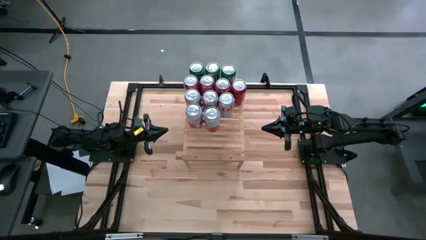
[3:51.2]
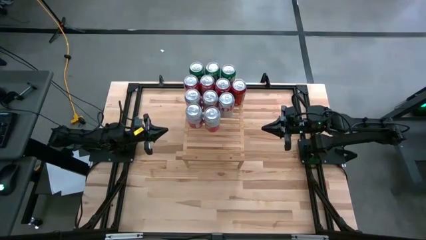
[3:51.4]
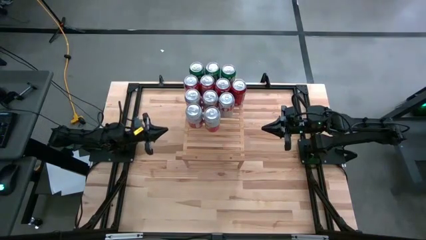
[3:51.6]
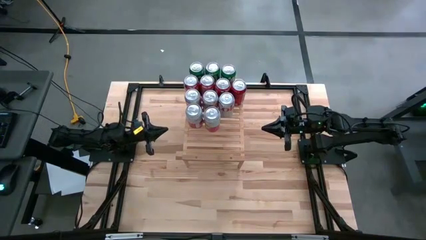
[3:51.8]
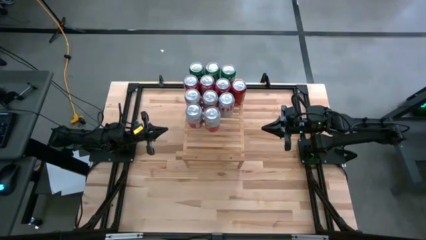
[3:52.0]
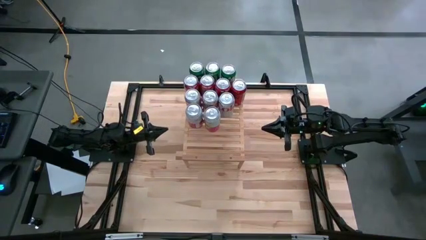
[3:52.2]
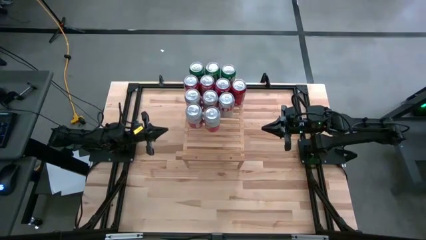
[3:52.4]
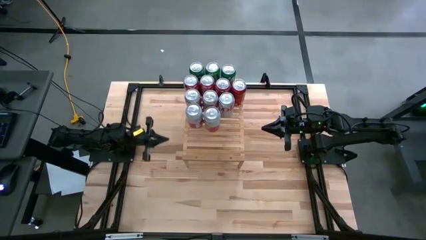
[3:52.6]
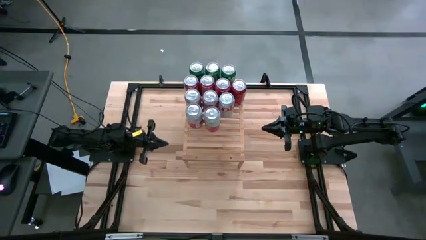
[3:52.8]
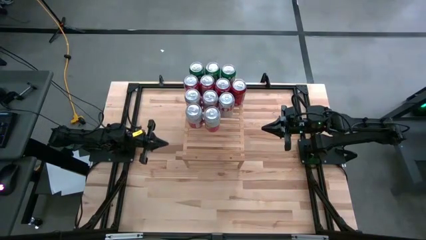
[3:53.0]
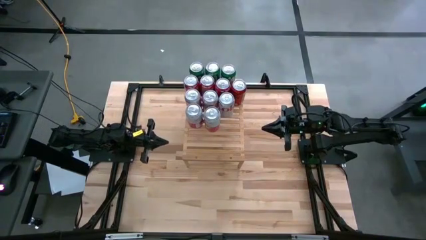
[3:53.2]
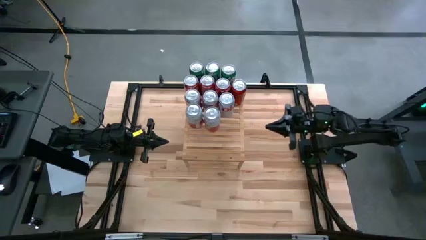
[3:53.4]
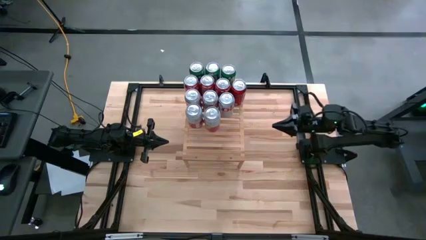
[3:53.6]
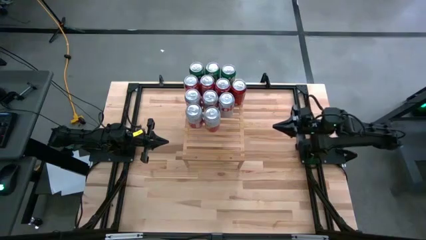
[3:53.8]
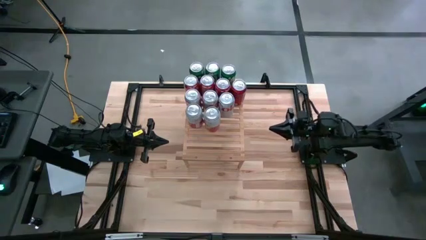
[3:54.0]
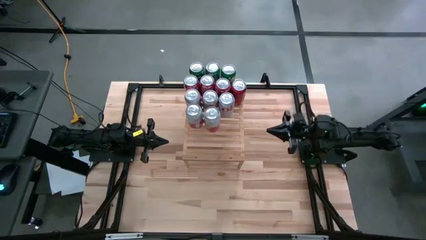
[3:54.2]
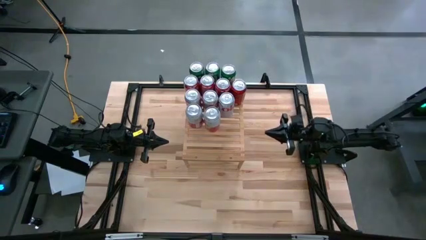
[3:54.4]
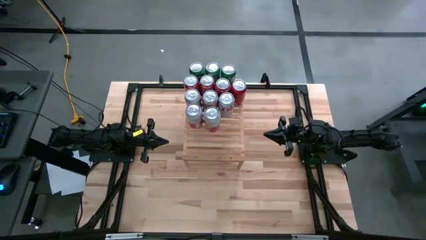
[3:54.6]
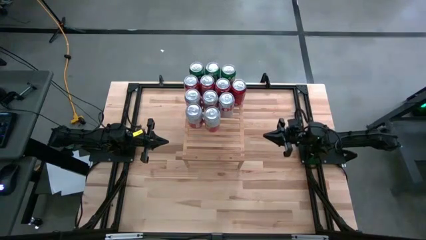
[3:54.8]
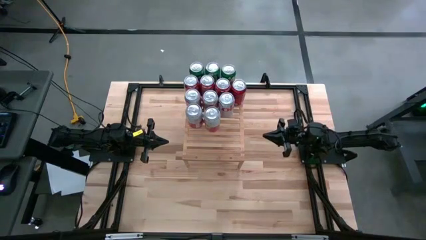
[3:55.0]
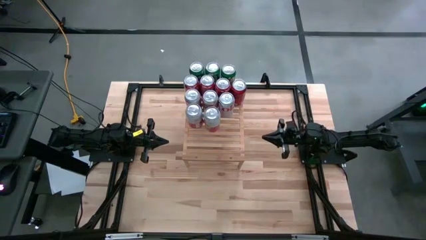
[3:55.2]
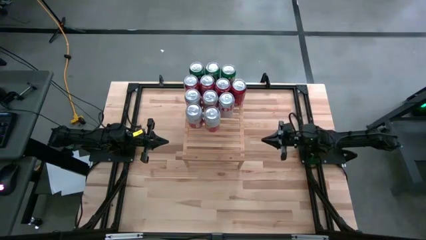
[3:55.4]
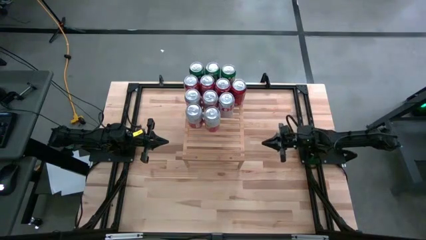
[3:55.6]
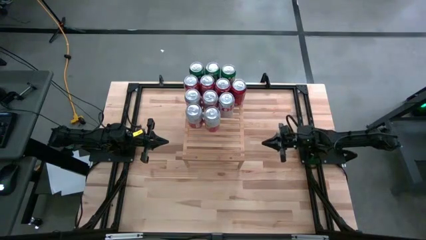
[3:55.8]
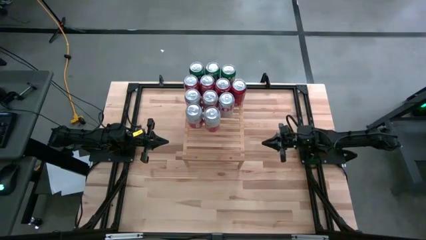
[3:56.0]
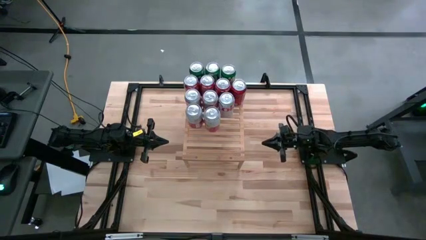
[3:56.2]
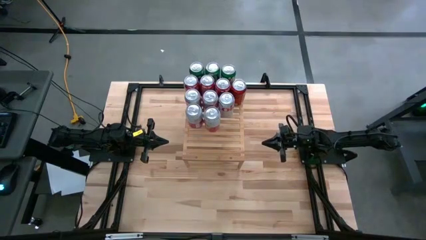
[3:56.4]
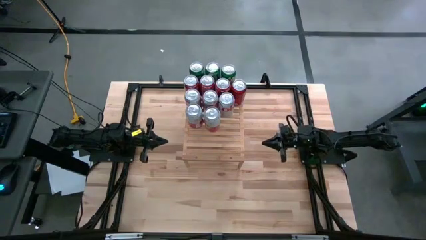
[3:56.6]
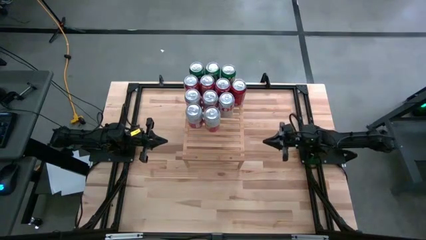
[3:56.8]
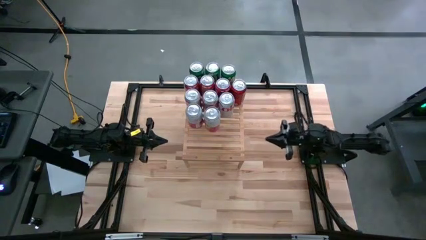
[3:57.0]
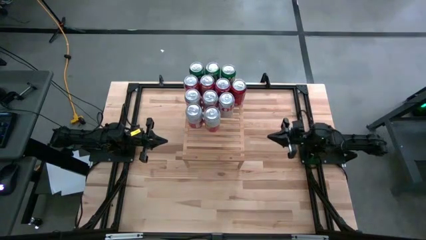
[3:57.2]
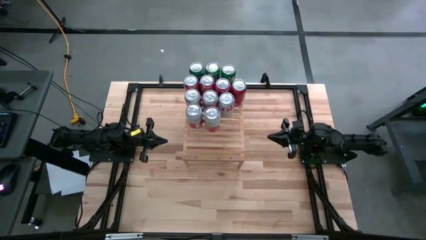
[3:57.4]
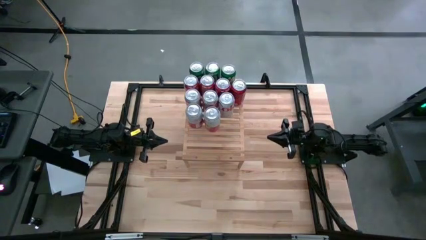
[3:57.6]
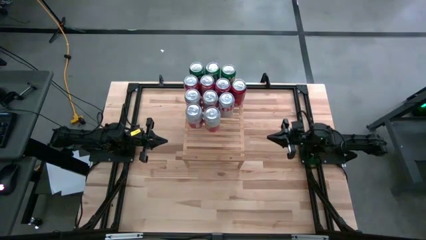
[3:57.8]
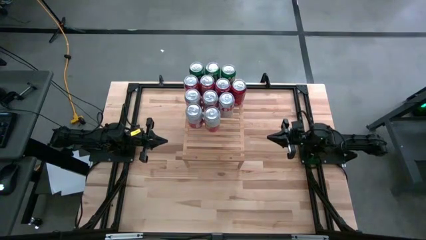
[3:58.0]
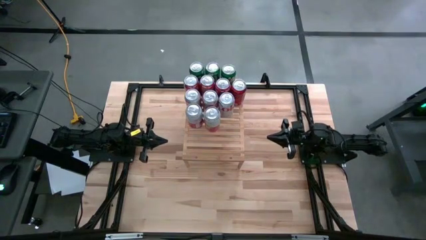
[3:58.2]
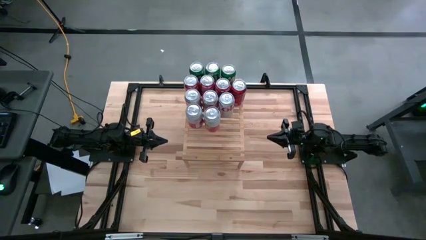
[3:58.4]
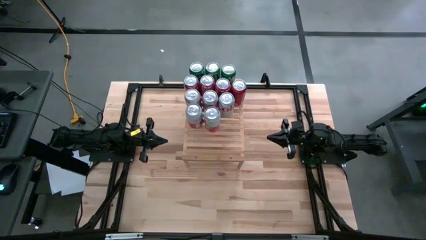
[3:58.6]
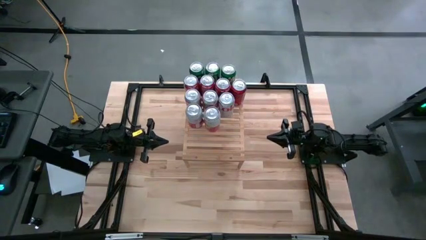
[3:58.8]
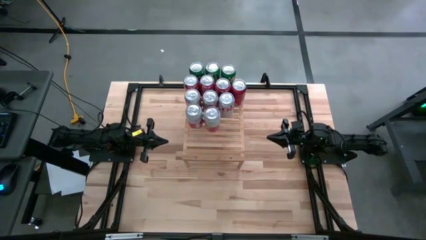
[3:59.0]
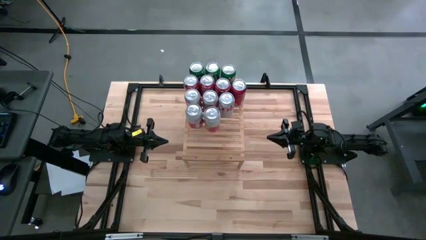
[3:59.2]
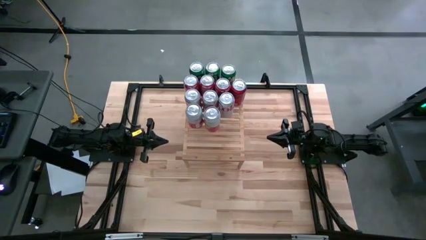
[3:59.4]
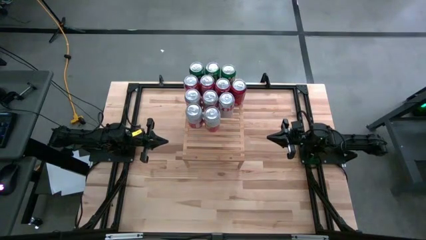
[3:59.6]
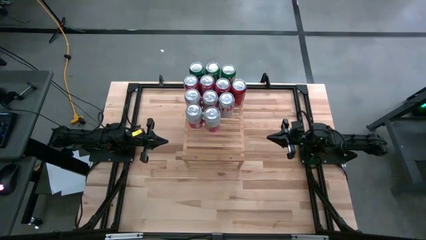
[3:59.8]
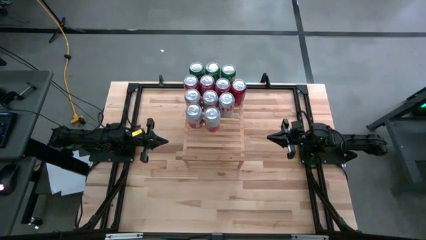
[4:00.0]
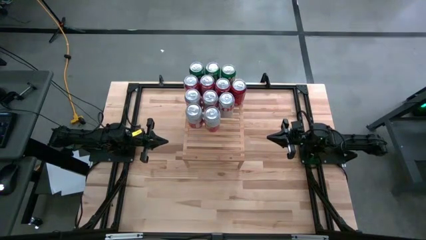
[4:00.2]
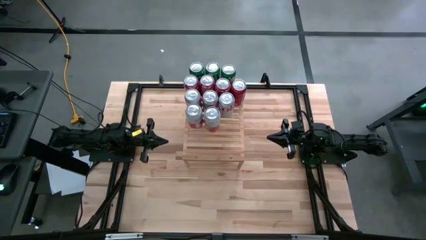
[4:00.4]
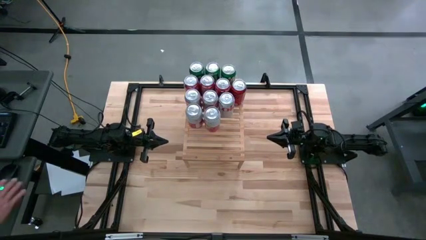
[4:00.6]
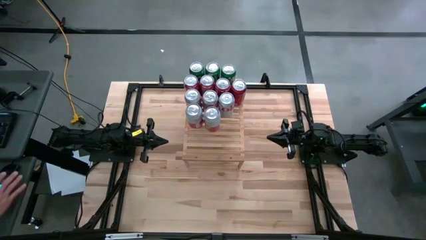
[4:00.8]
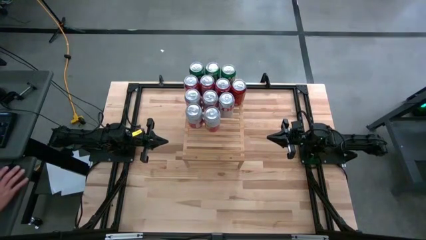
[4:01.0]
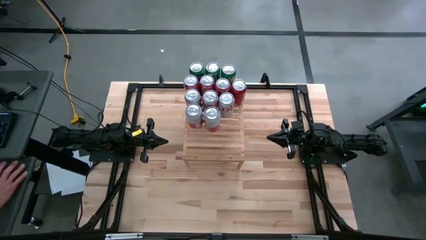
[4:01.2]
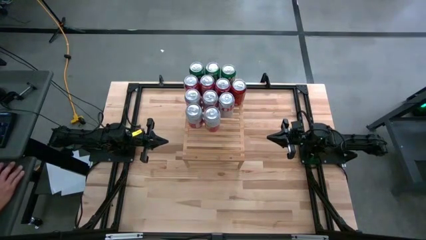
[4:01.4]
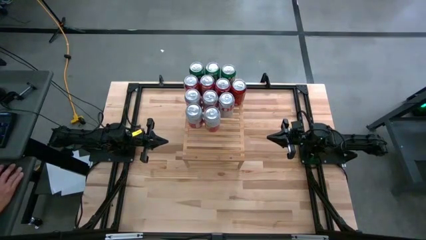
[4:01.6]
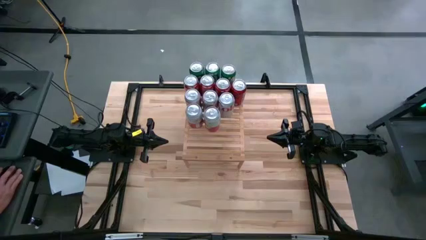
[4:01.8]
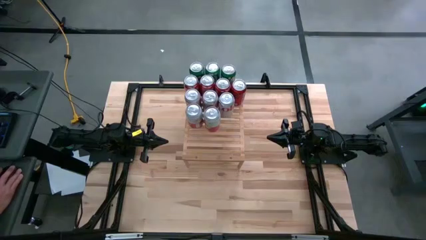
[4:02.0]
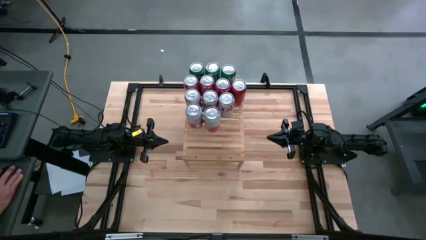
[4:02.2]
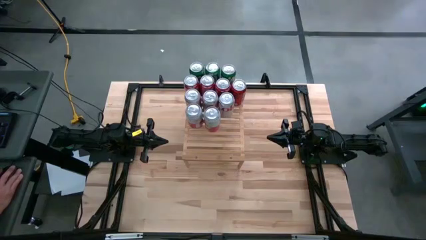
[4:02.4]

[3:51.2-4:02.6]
Task: Place canned beverage on shelf
Return to Home Position

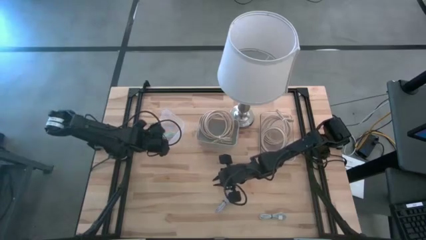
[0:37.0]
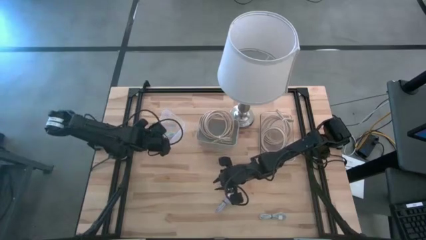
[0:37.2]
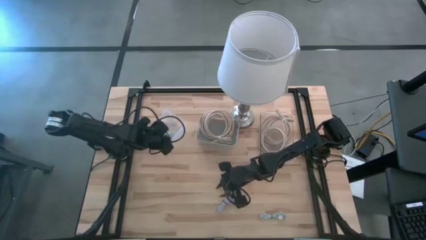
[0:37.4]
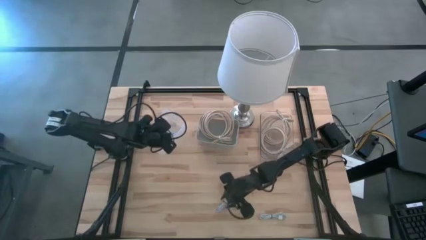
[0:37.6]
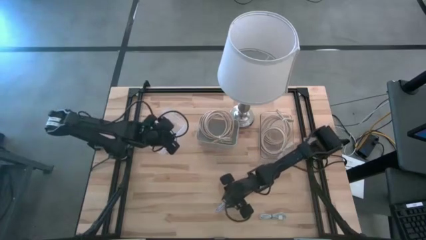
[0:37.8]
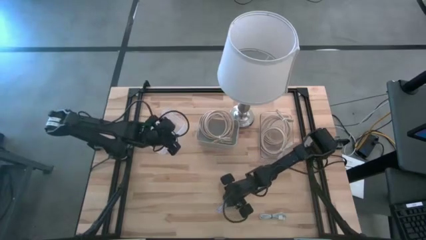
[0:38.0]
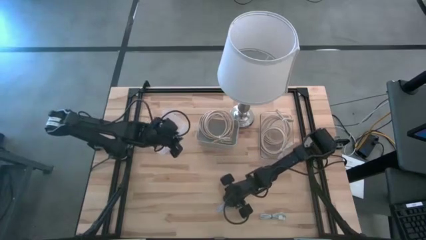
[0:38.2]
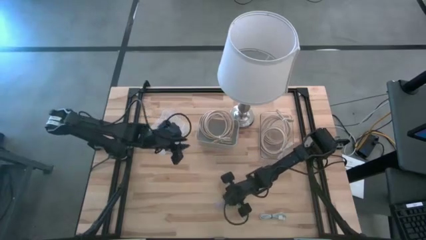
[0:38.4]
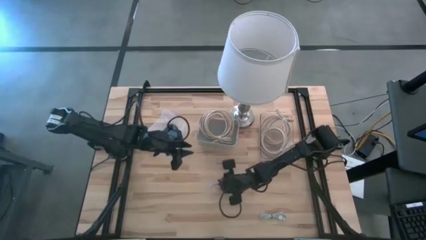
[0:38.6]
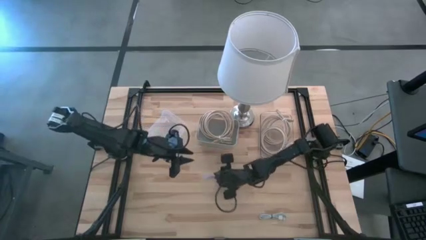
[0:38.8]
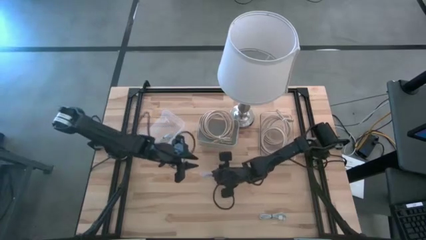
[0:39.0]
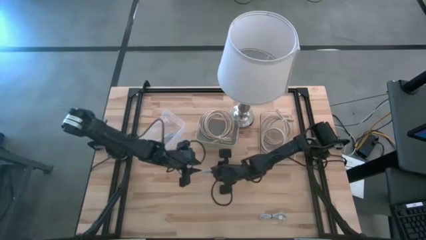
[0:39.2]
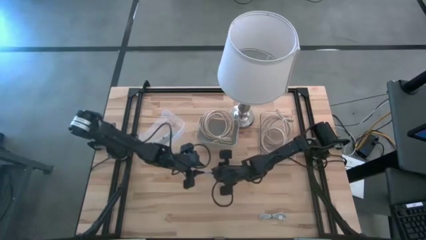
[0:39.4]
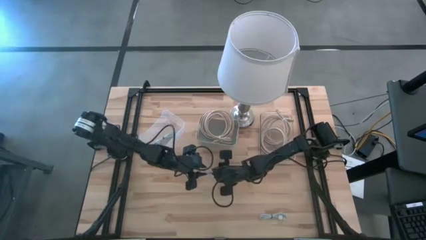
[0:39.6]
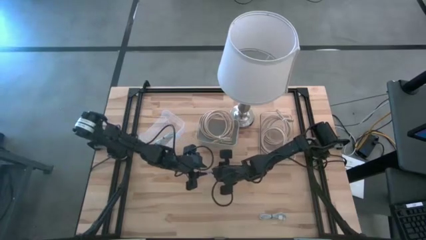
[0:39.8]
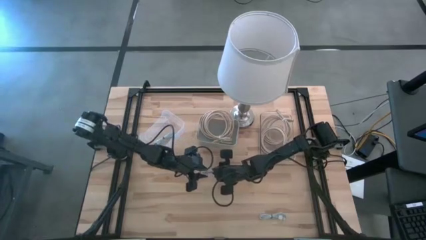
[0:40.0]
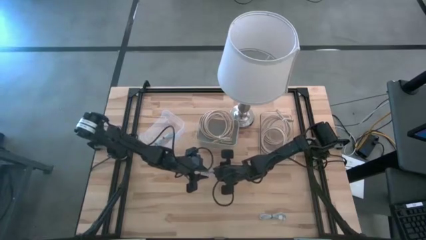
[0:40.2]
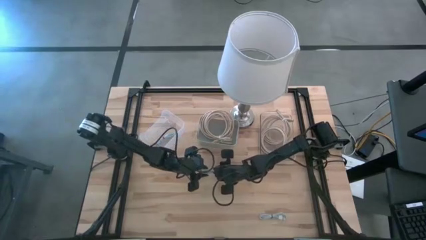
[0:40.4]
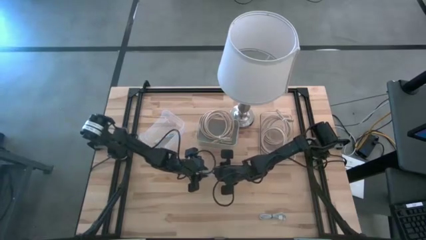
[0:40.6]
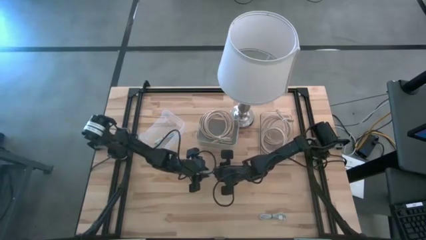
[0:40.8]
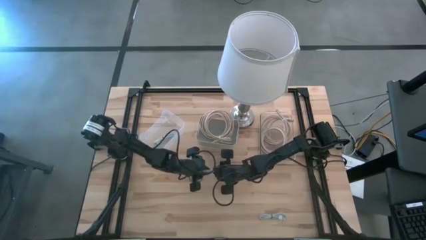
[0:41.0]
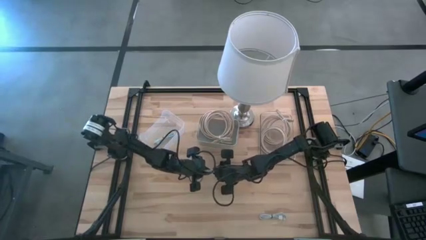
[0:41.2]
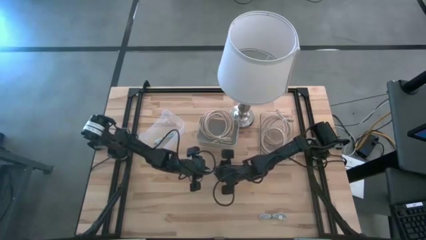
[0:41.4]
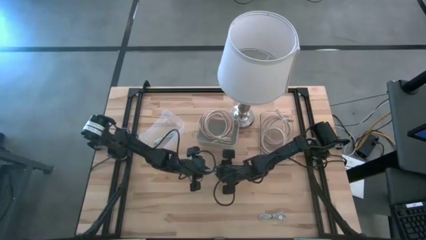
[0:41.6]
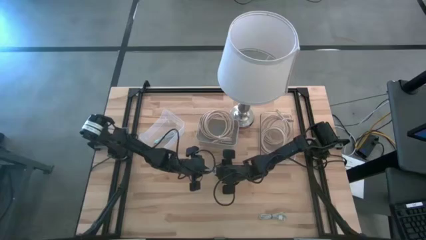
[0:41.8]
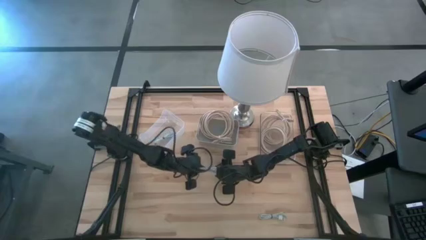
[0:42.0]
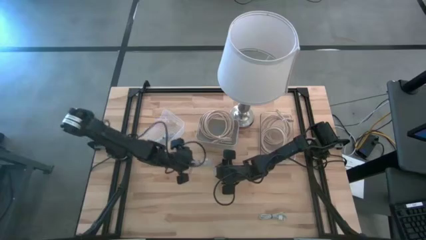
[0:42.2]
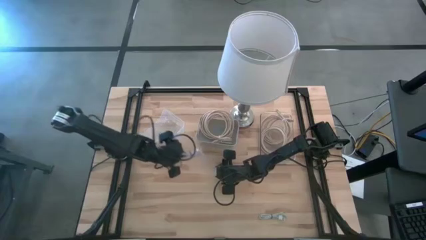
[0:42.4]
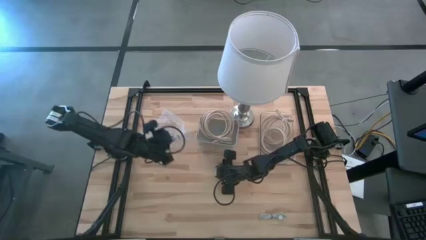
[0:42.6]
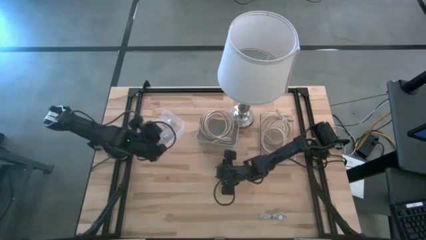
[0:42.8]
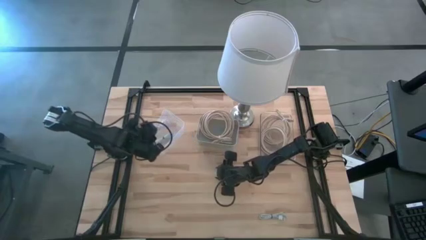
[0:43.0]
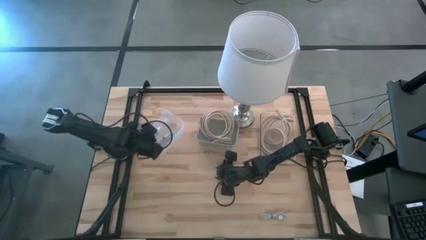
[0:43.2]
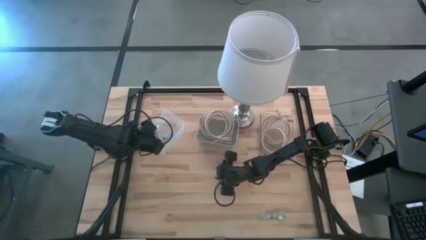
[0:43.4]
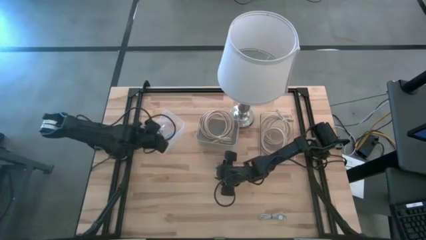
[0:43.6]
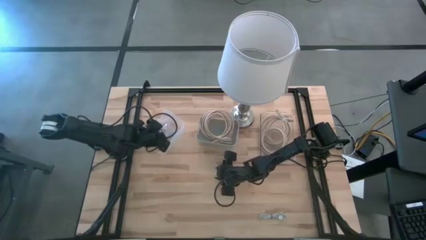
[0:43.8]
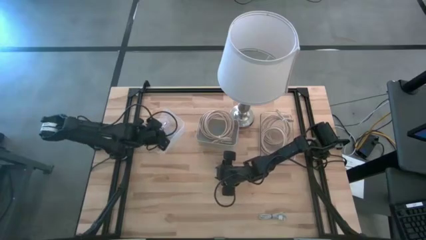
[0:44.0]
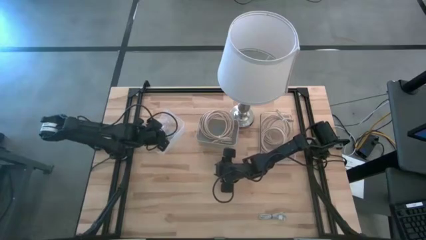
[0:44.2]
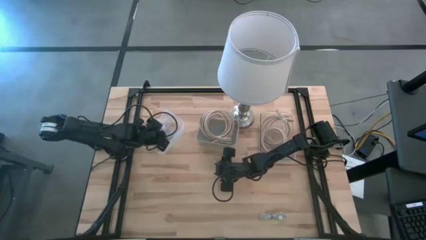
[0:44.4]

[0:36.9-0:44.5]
Task: Pick & Place USB Port
Put the purple USB charger cable into the white bin
